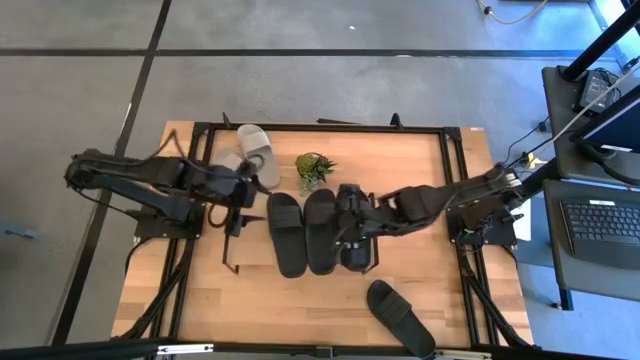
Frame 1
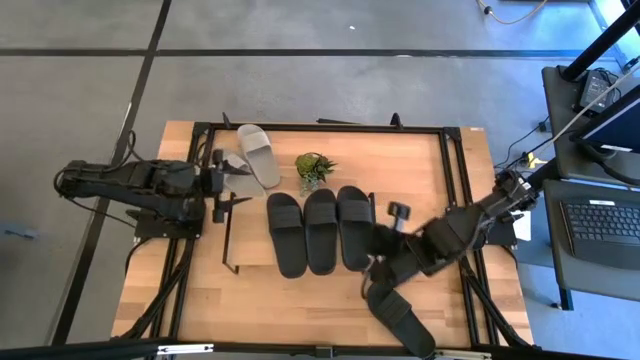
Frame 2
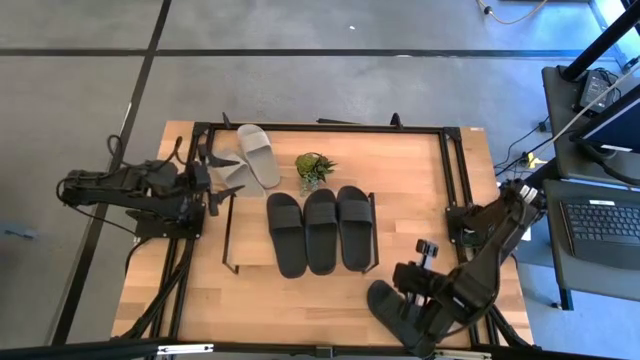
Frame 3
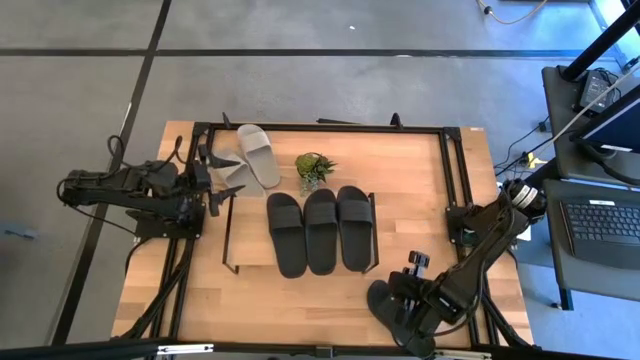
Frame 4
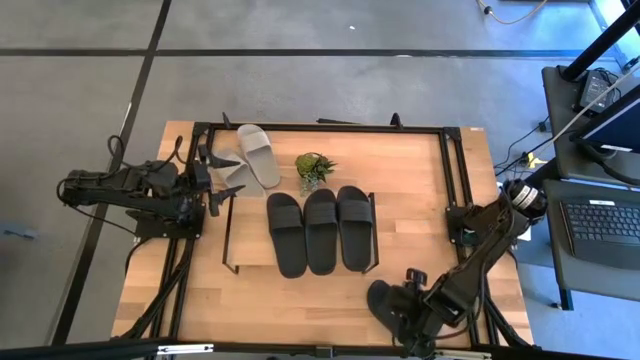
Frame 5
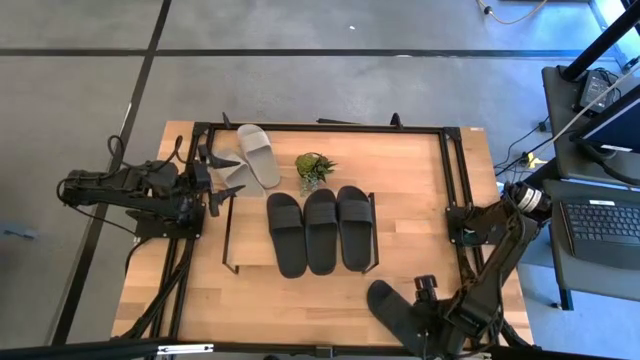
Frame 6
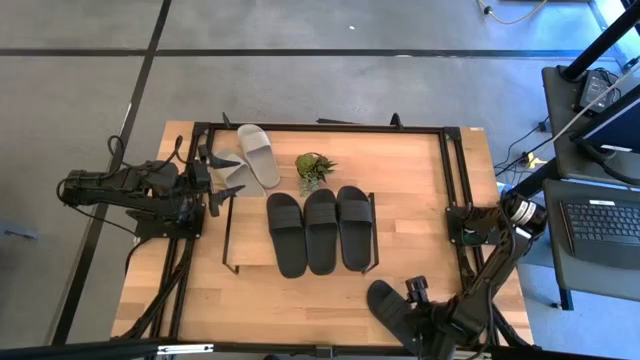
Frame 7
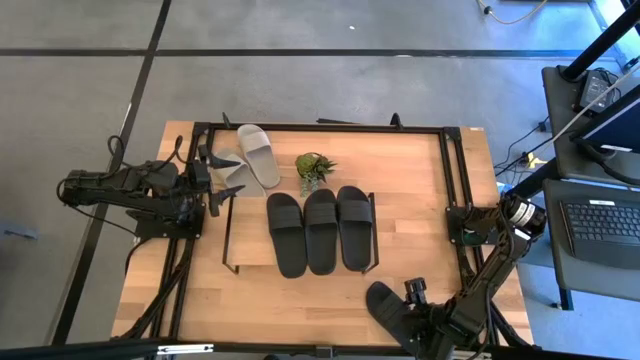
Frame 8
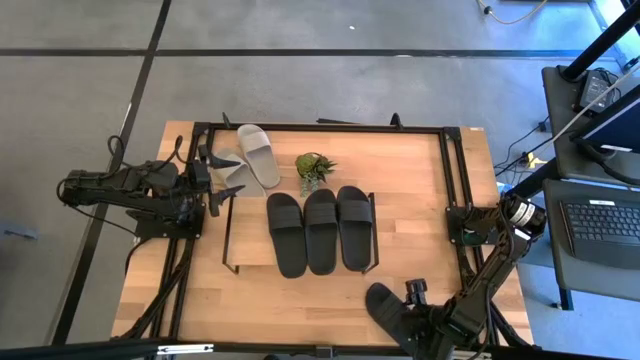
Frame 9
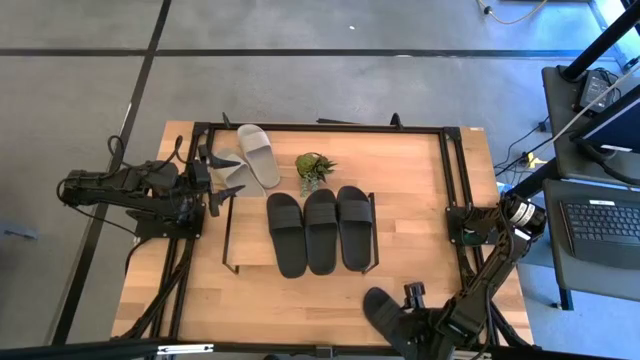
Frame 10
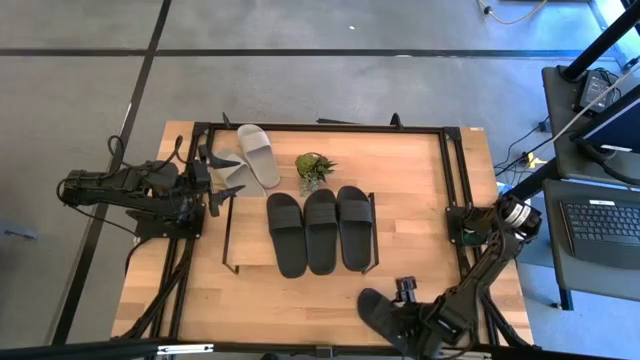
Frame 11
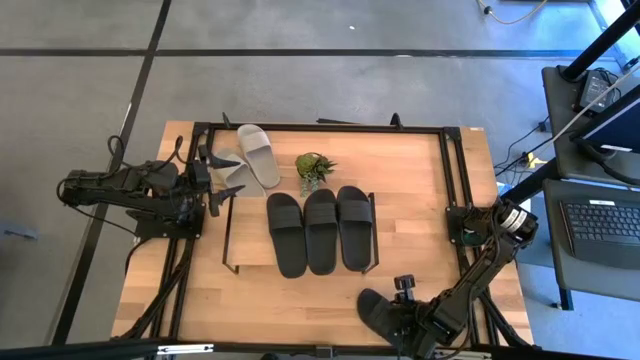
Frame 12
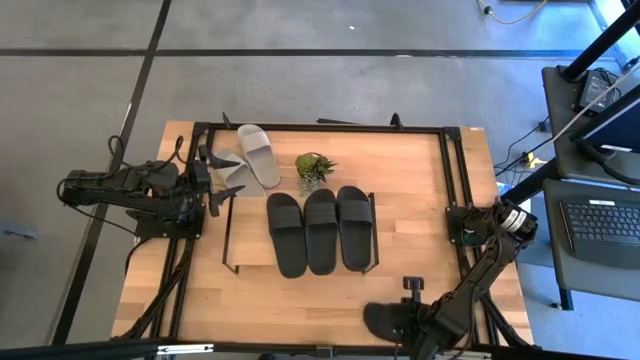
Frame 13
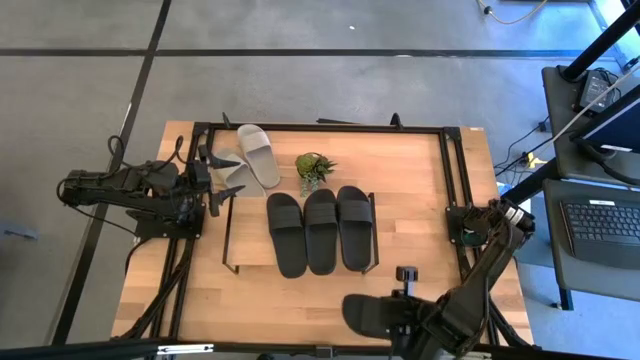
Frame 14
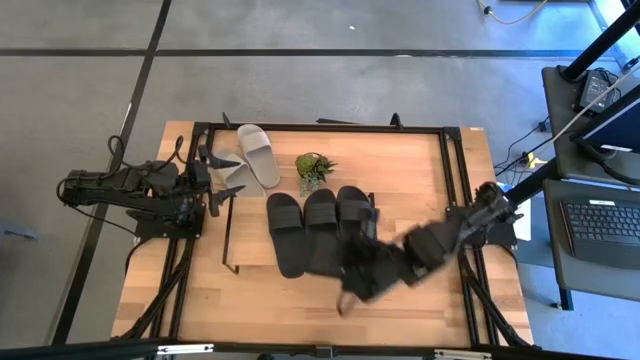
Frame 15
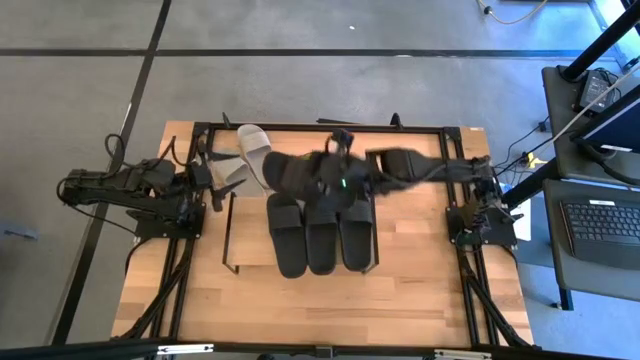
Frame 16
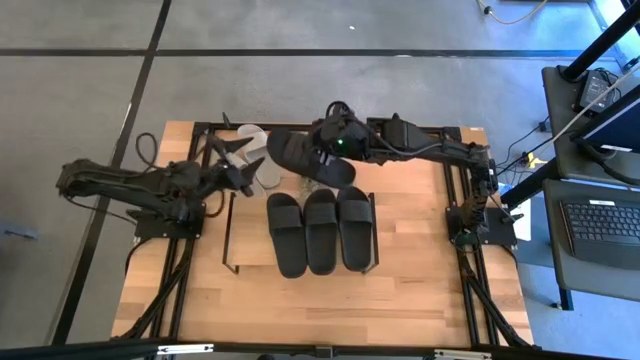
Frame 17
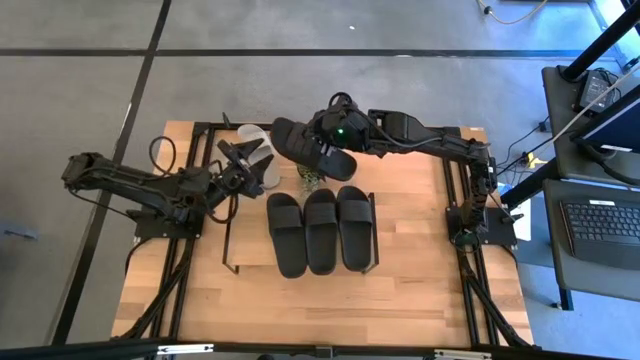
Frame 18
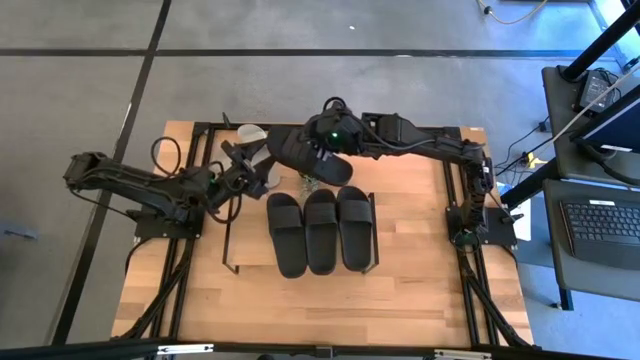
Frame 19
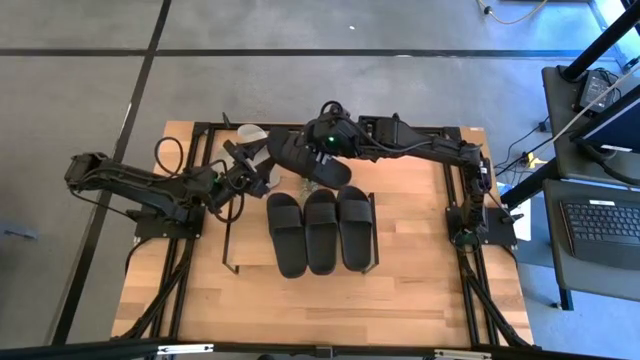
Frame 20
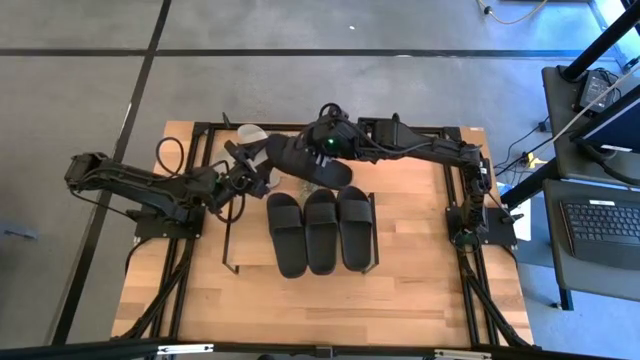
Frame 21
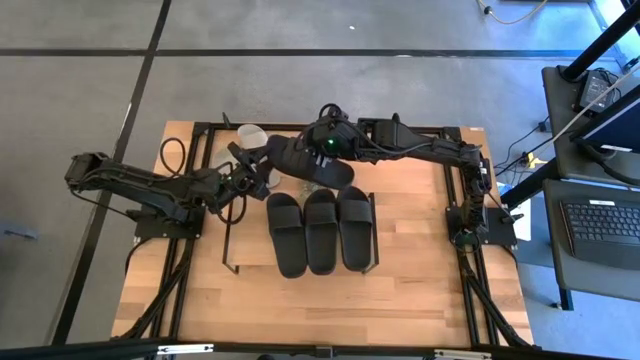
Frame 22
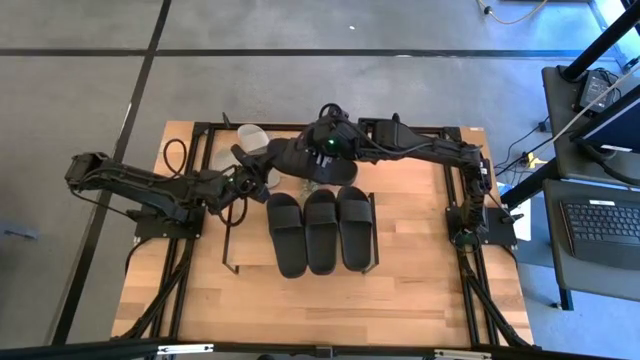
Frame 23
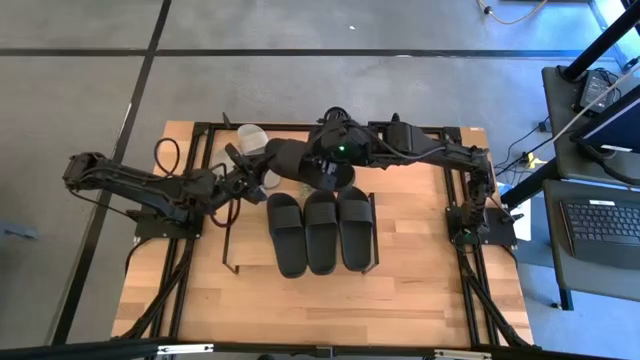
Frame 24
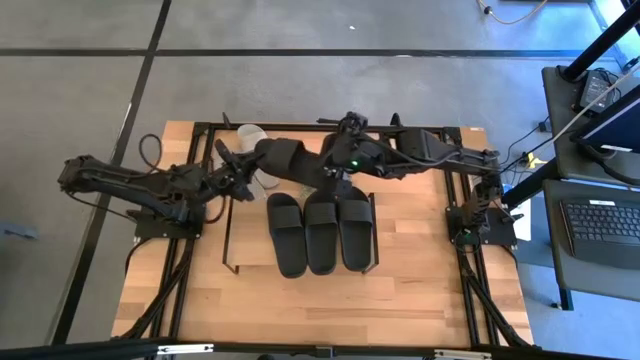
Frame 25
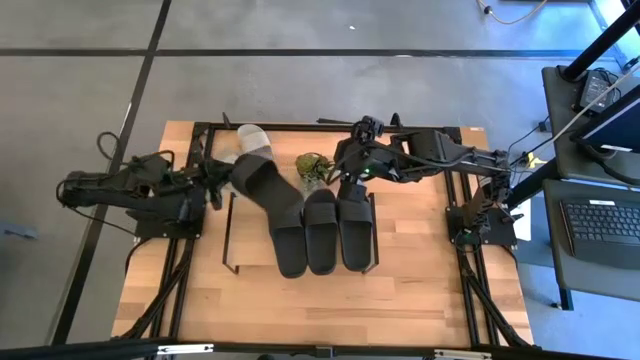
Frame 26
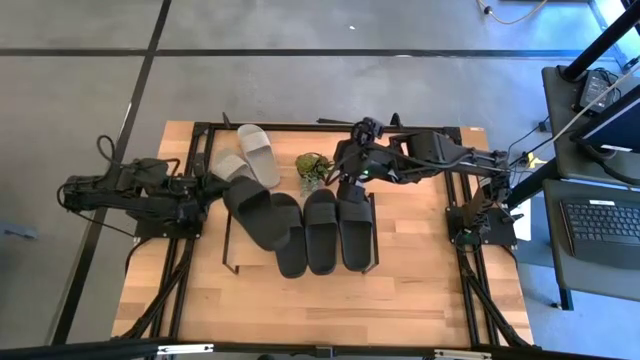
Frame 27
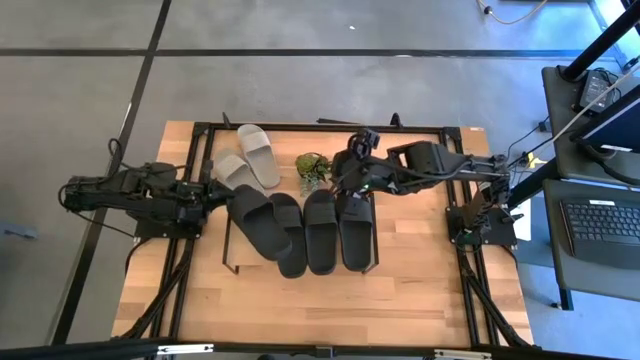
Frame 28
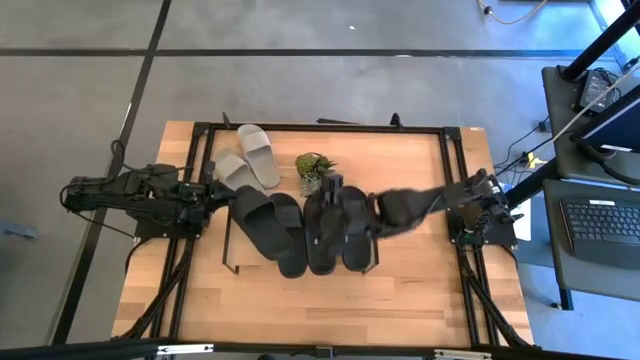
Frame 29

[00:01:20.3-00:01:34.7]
Task: Pick and place slides into the shelf
Put the black slide on the shelf

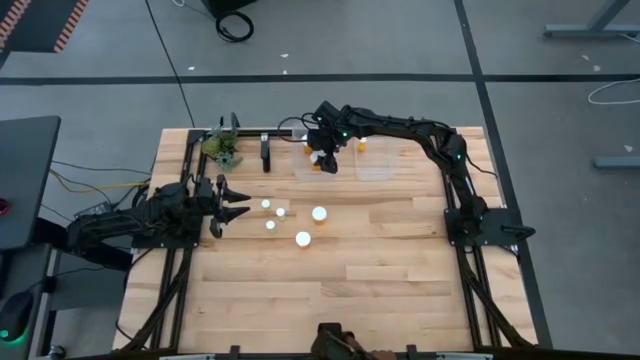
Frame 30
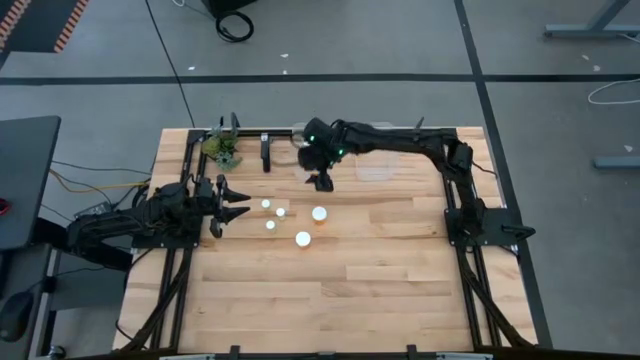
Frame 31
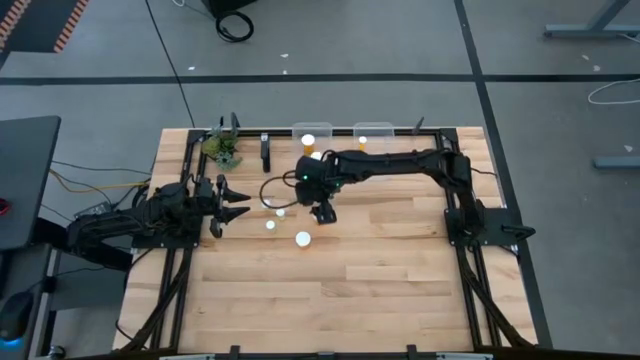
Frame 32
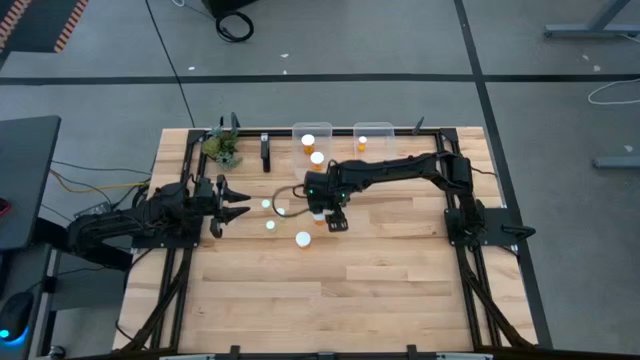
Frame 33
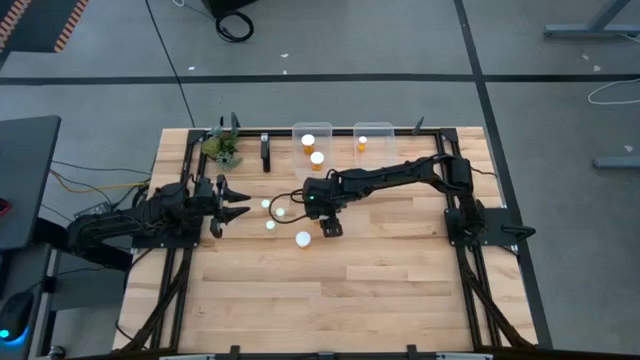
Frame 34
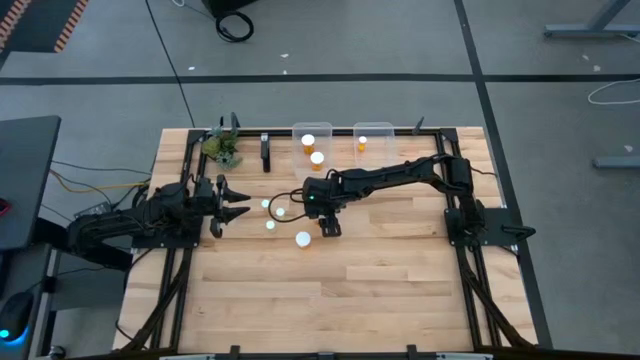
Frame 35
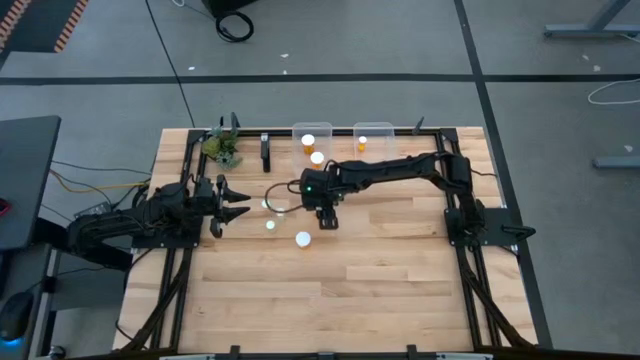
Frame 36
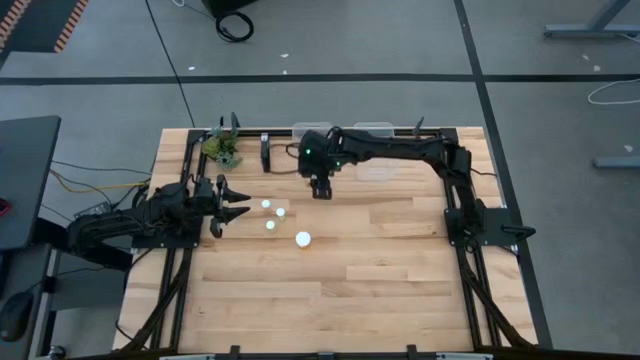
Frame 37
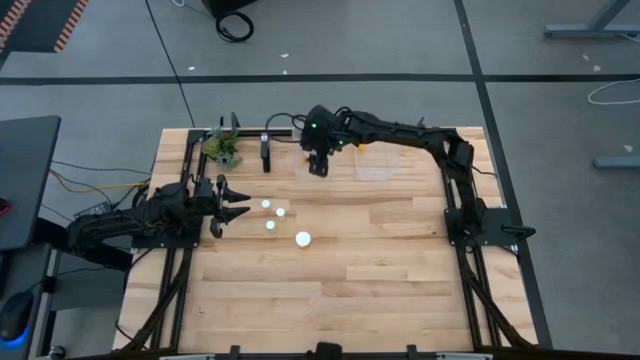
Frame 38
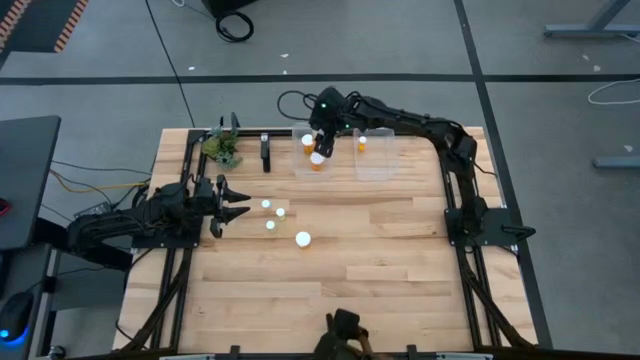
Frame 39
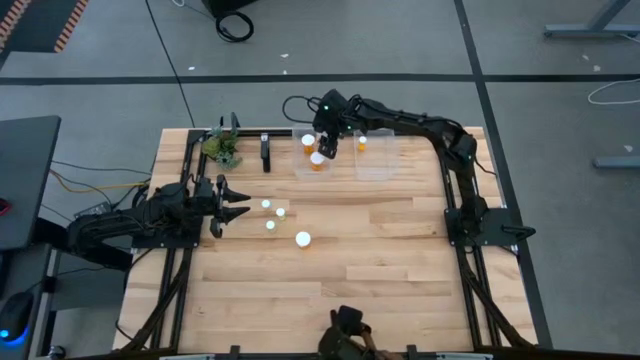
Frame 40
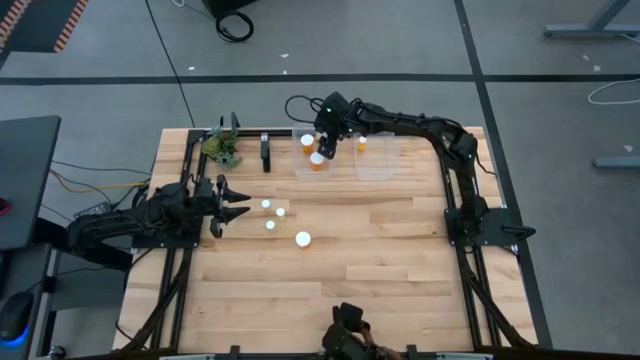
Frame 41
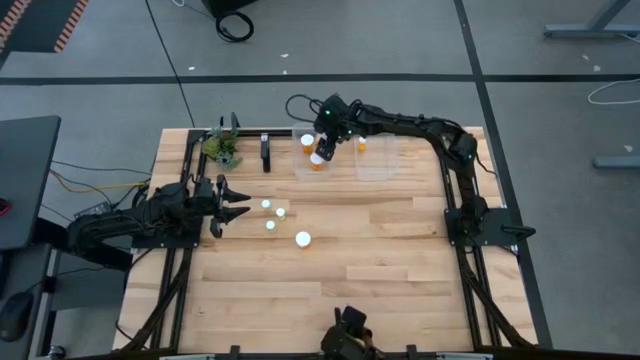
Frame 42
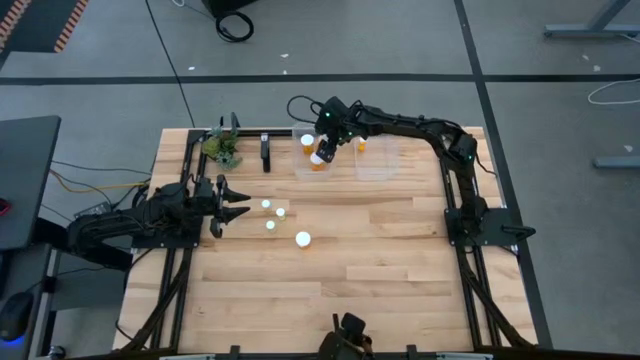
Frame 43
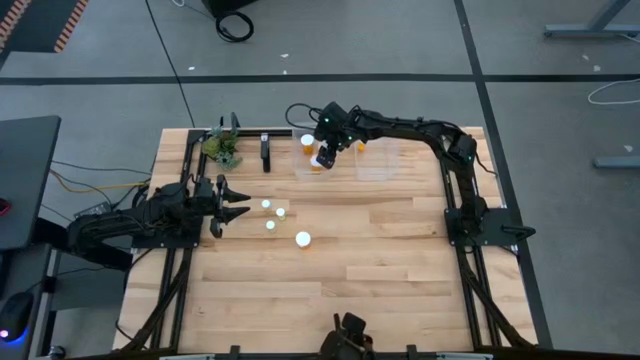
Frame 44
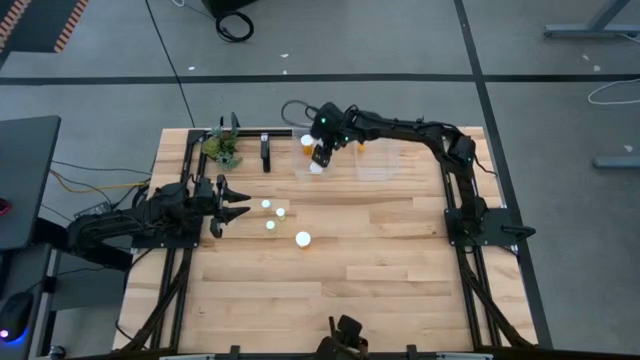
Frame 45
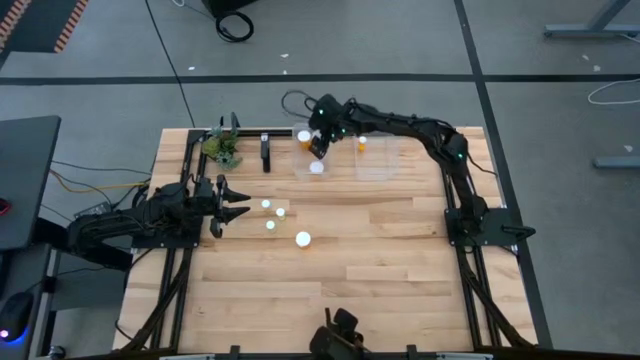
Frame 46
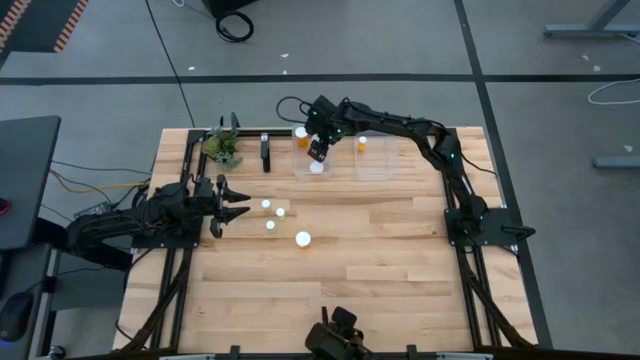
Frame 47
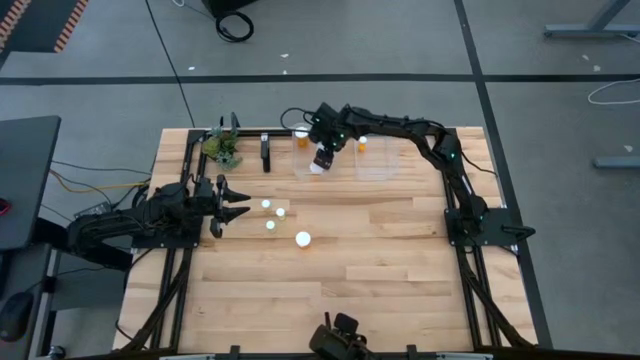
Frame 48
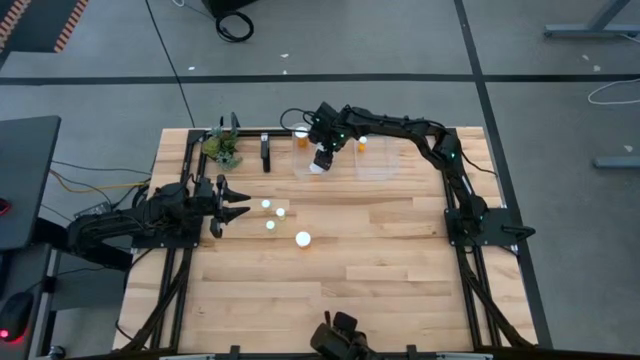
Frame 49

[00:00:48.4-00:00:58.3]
Task: Pick and place medicine bottles into bin by pill shape (circle, oval)
Put the large orange pill bottle into the left transparent bin
